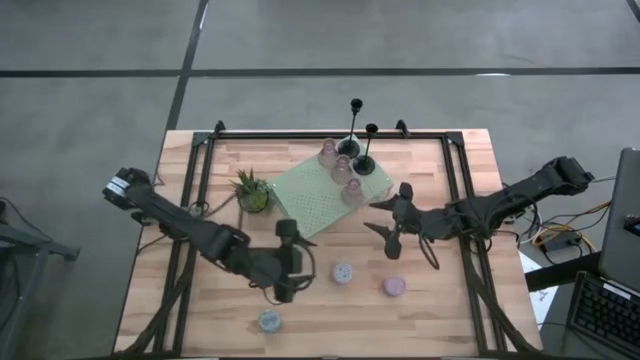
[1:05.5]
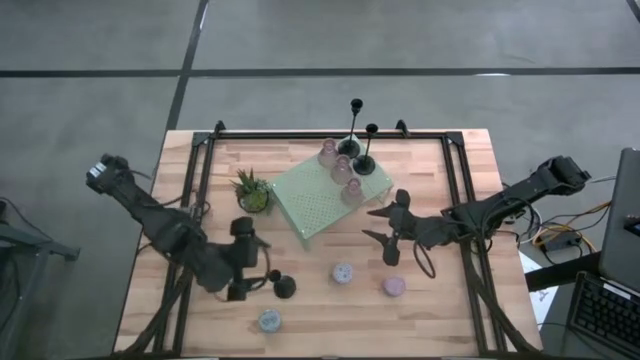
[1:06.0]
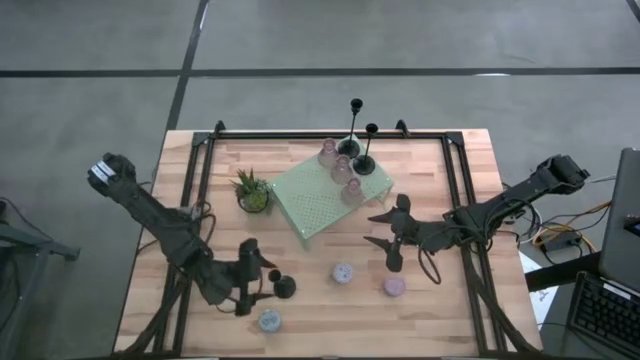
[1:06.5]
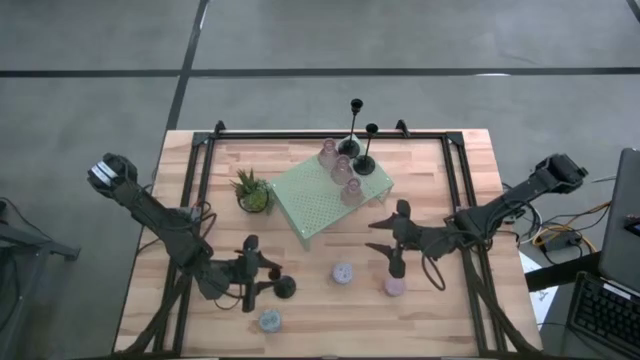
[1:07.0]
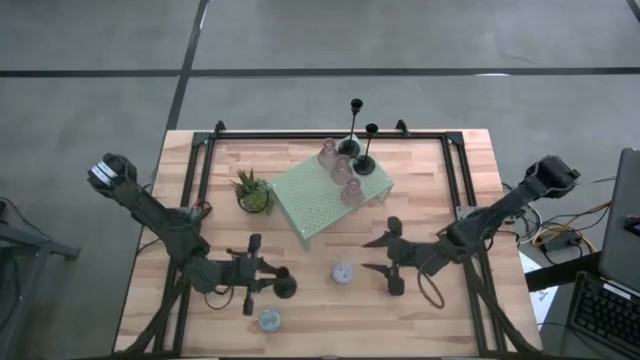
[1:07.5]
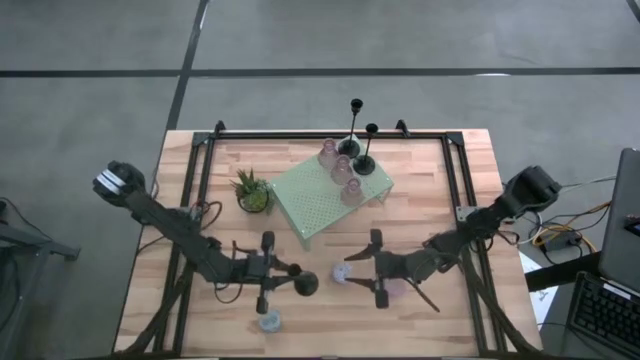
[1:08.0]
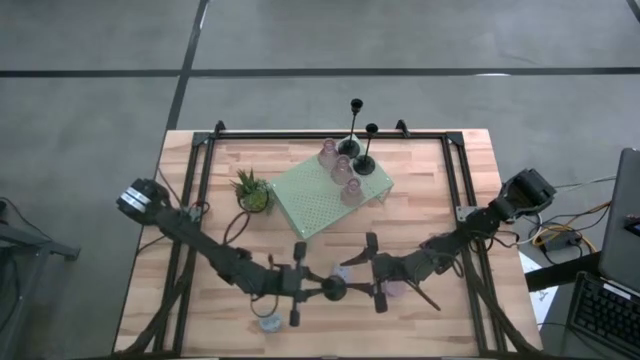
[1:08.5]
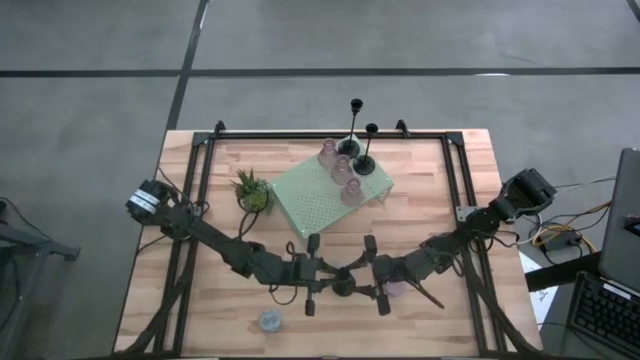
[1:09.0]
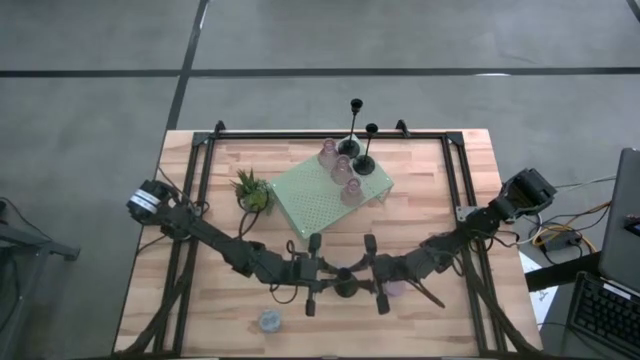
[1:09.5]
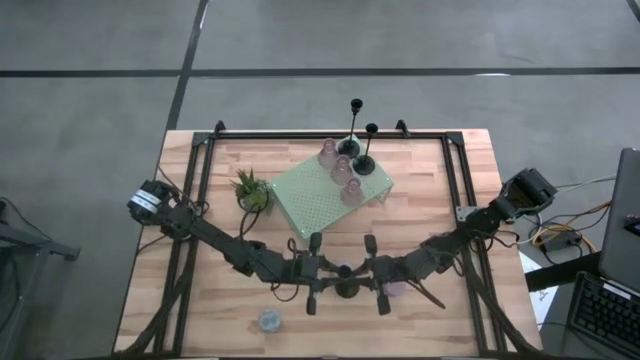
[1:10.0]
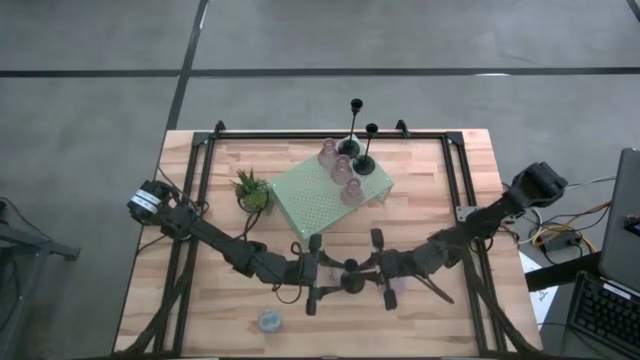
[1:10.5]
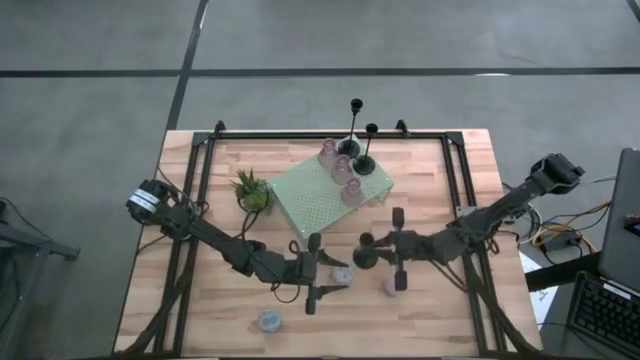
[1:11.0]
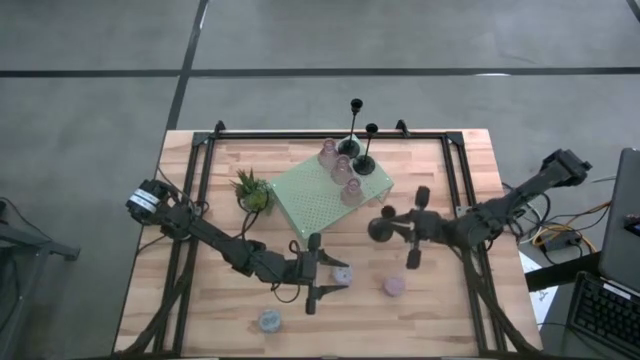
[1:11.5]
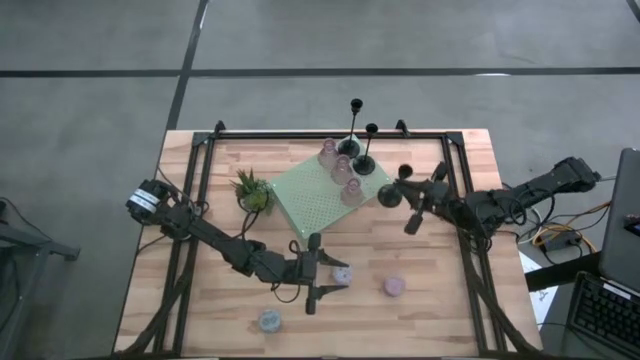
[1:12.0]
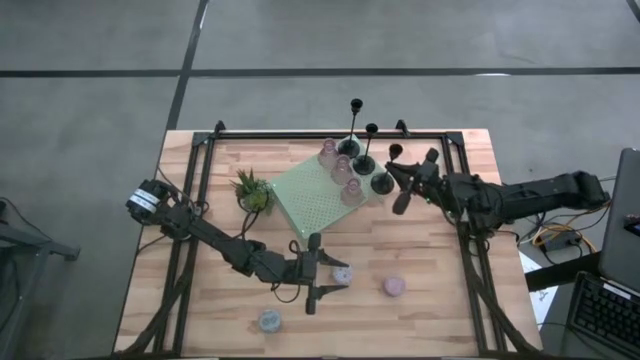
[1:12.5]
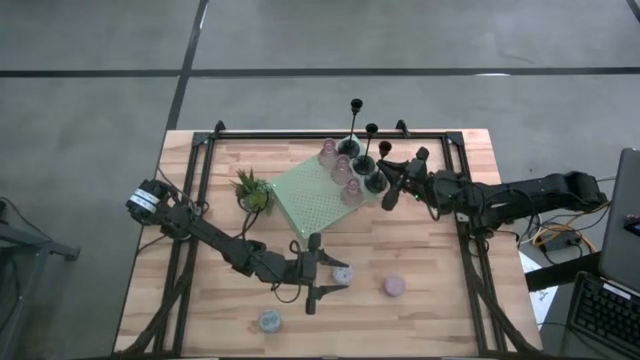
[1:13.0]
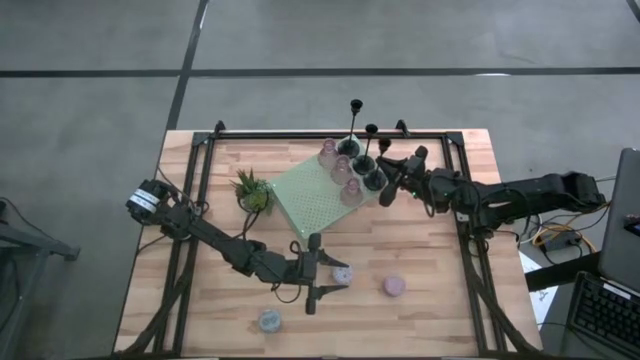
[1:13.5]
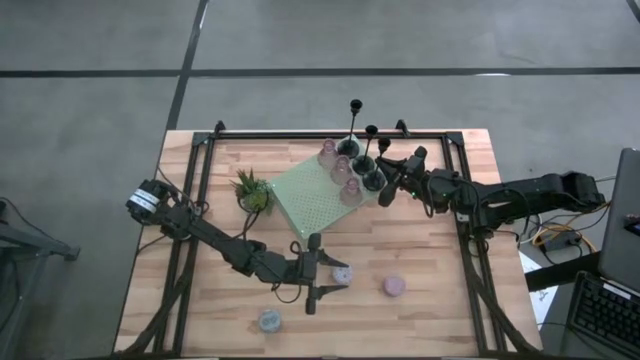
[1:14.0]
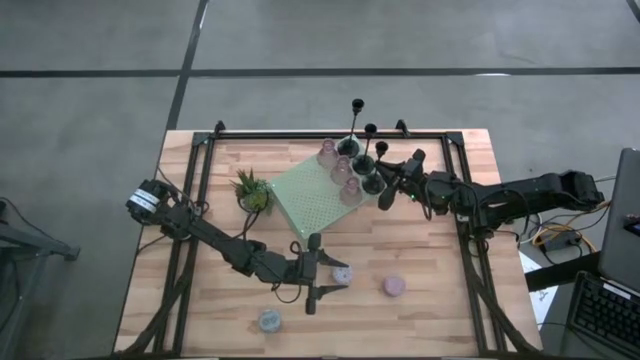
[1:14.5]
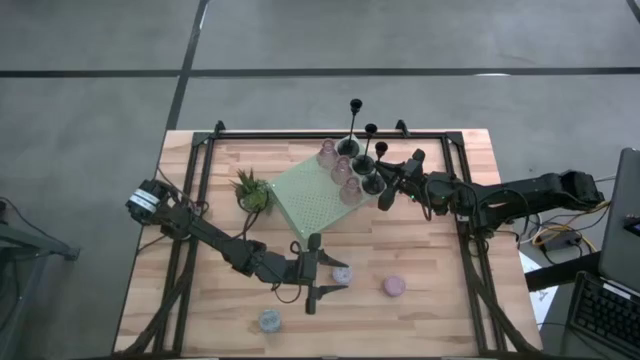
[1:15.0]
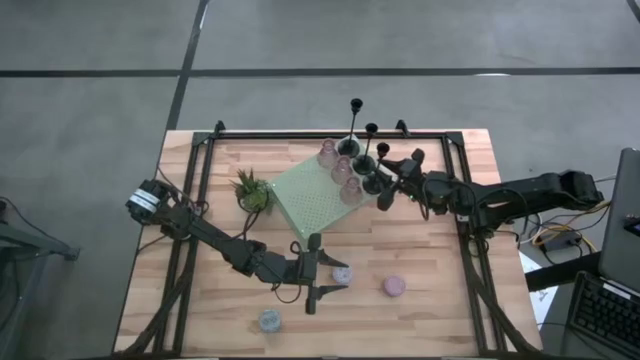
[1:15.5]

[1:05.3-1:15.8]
Task: Pick & Place candle stick holders
Put the black candle holder on the shelf aligned with the other black candle holder

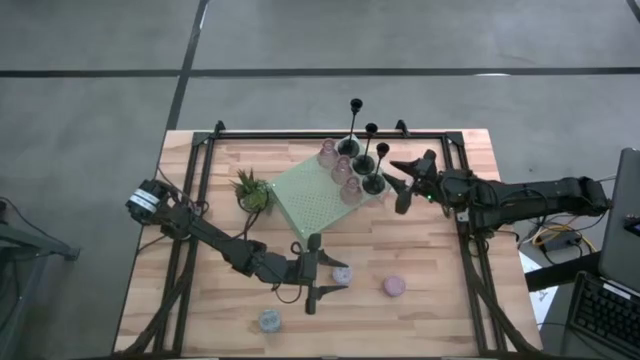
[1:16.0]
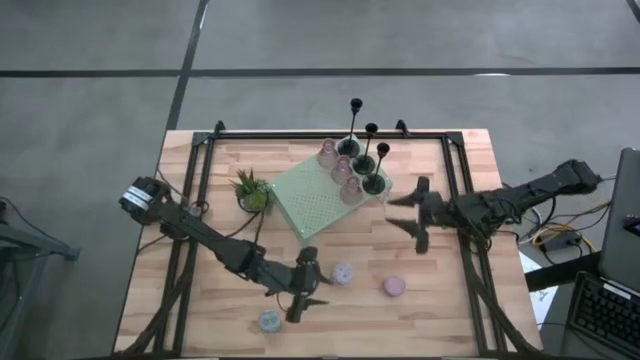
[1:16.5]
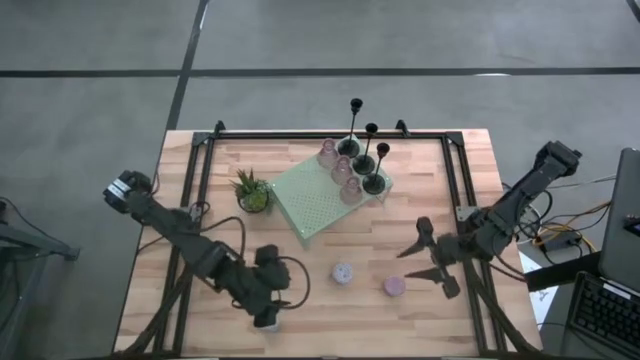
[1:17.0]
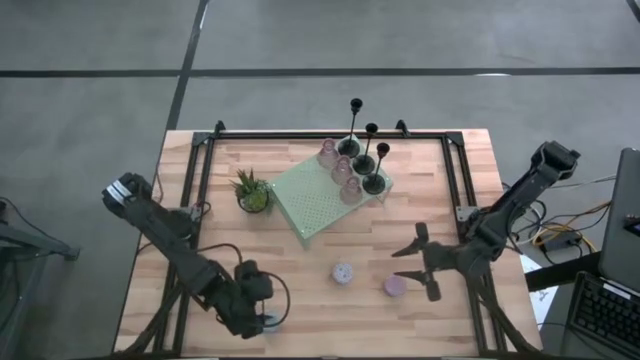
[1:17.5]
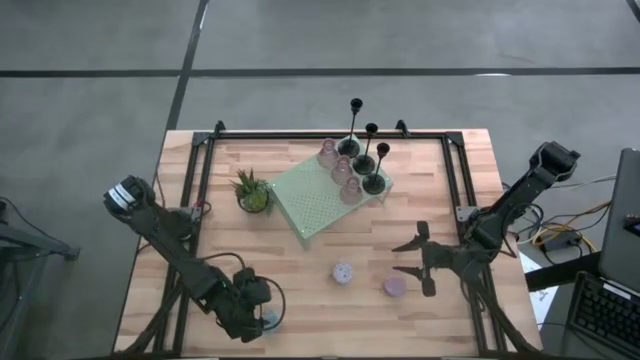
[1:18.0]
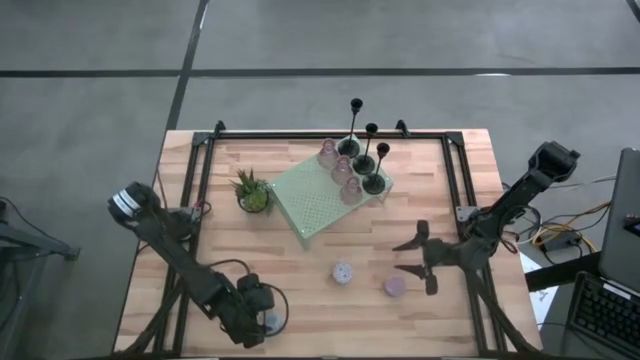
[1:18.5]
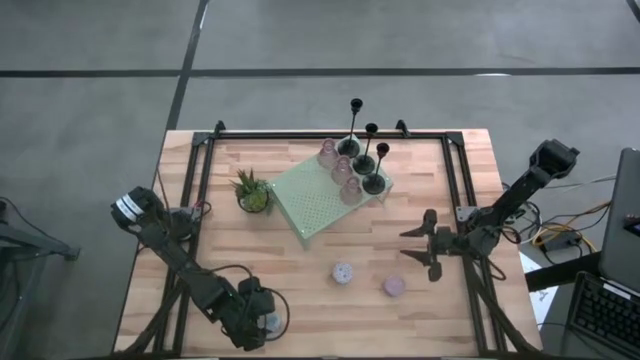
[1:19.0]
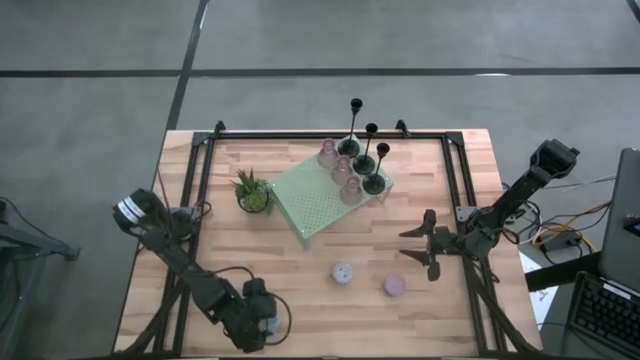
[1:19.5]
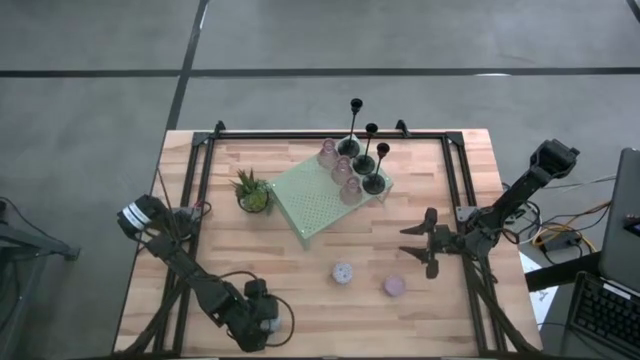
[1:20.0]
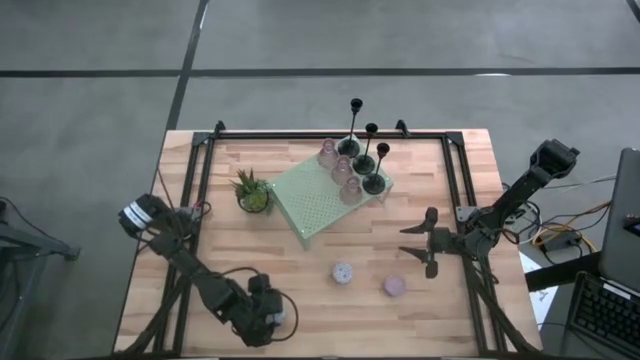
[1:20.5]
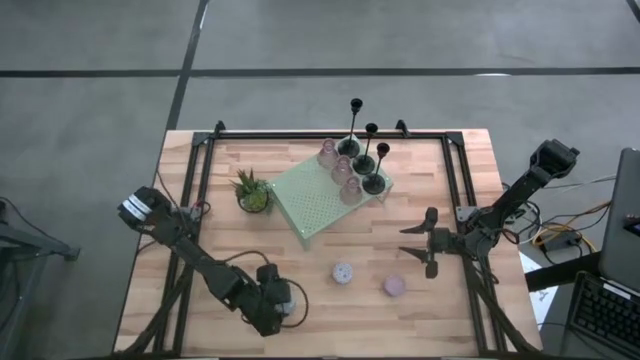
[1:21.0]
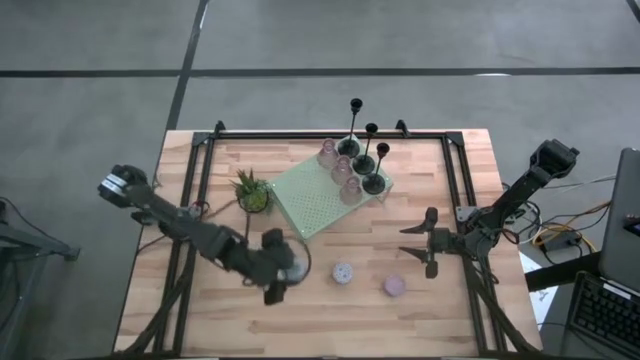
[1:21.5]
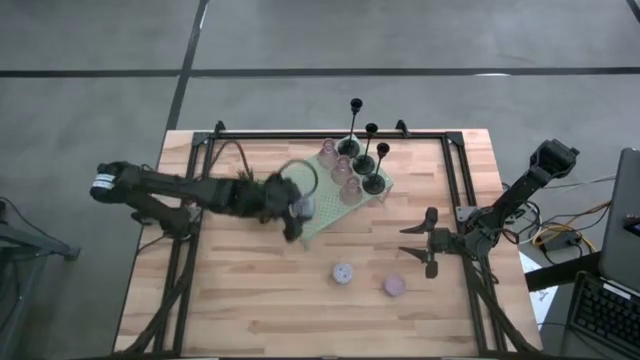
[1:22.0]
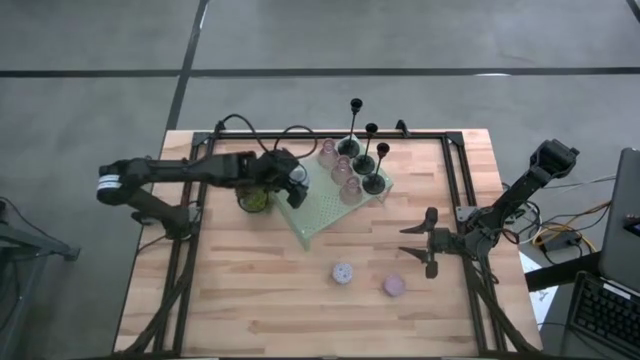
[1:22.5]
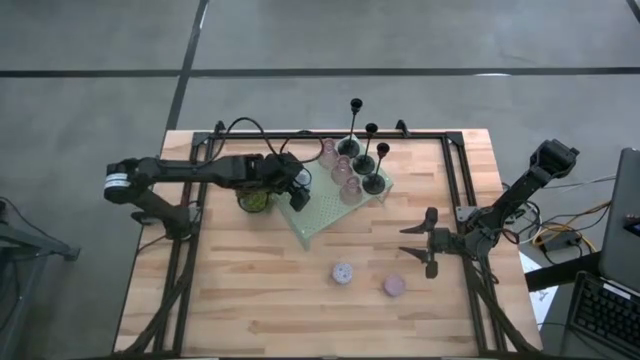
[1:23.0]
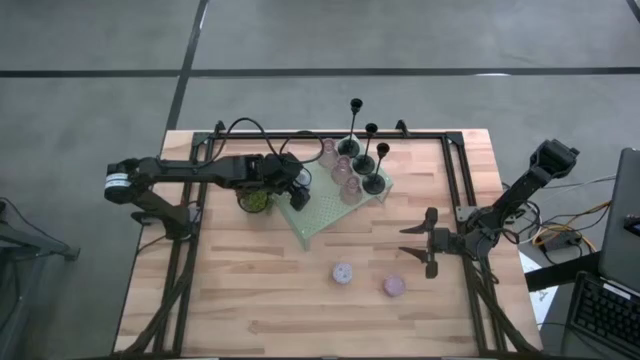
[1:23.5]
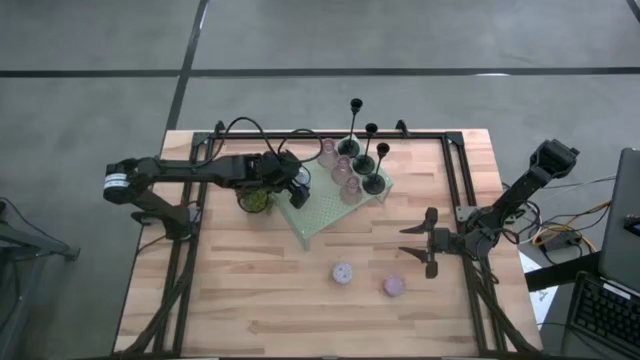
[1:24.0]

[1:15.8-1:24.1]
Put the green scented candle on the shelf

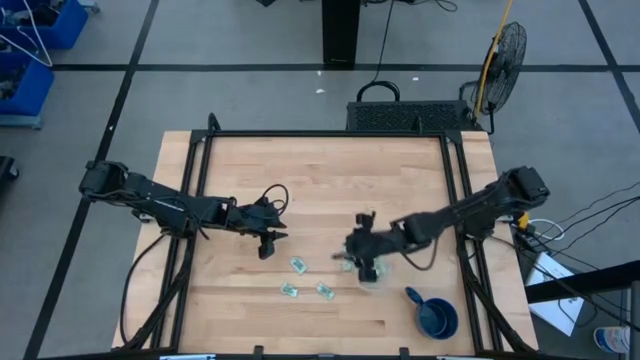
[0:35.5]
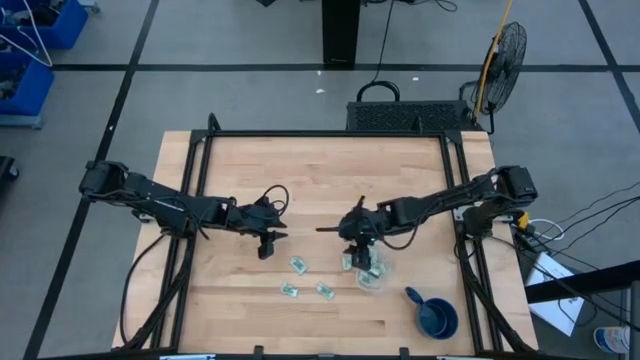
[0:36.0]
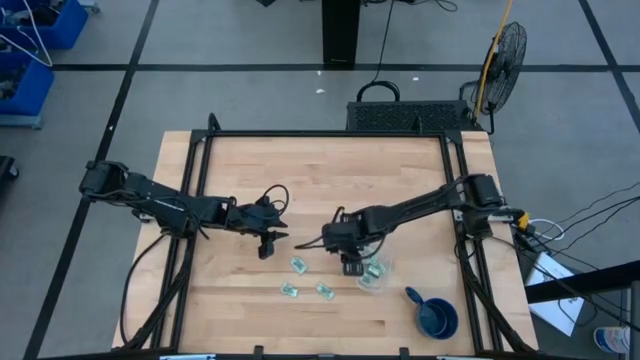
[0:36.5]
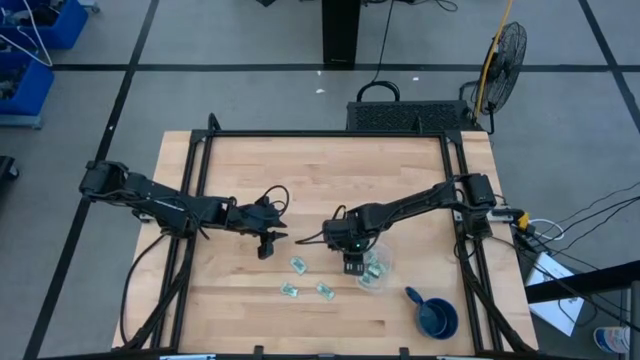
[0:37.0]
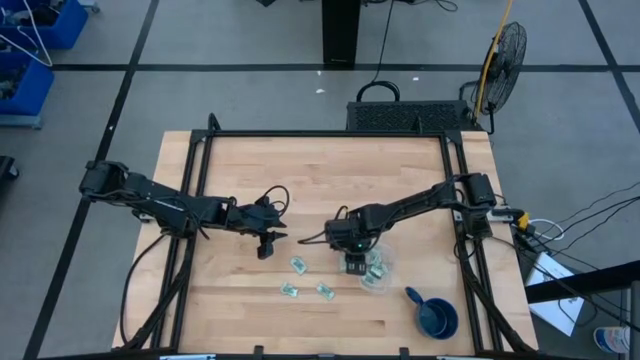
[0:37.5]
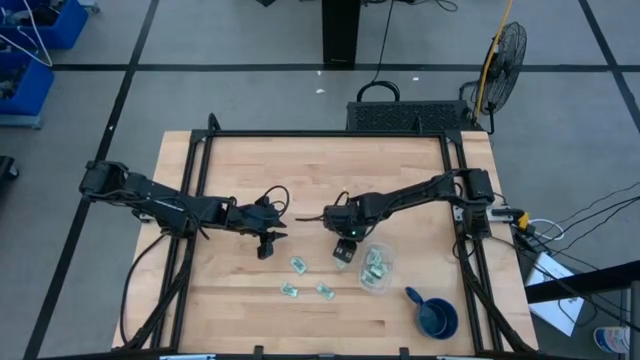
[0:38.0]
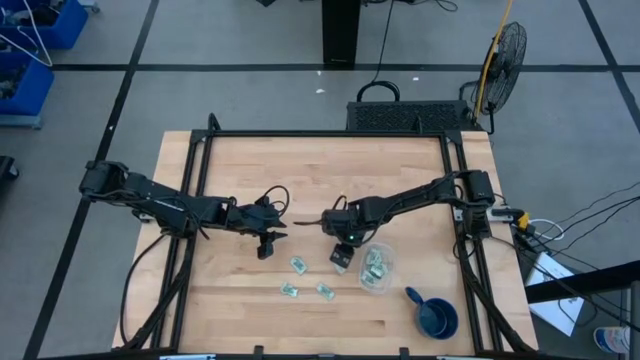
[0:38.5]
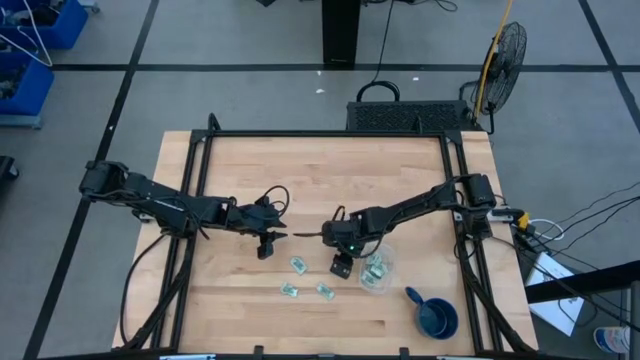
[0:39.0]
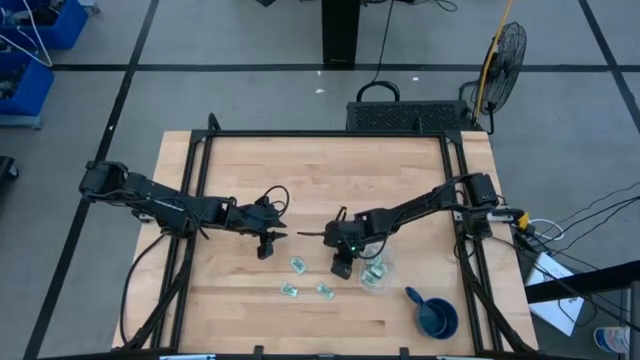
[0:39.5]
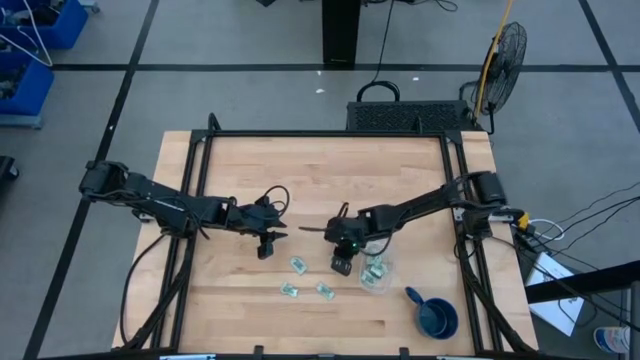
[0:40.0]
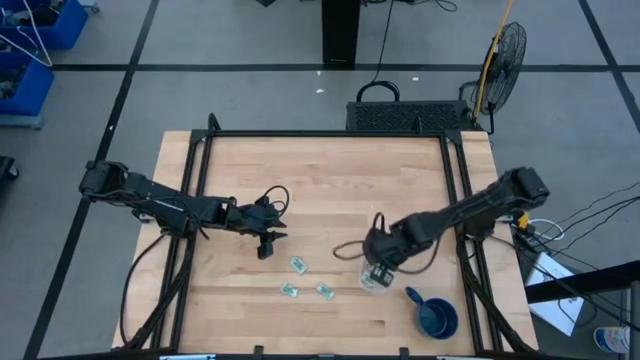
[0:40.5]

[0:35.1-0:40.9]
Task: Pick and place Stevia / Truvia into bins
Put the stevia packet into the transparent container
